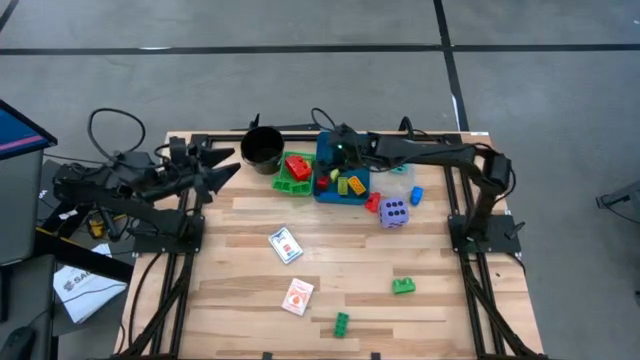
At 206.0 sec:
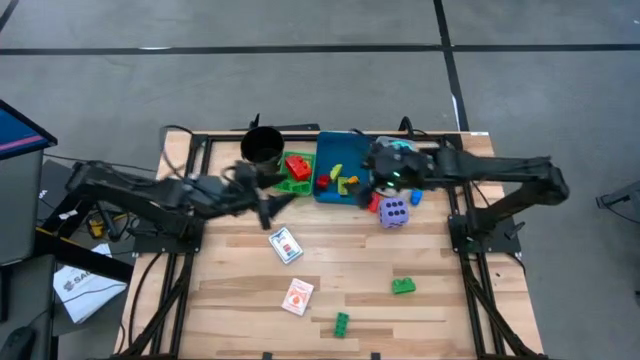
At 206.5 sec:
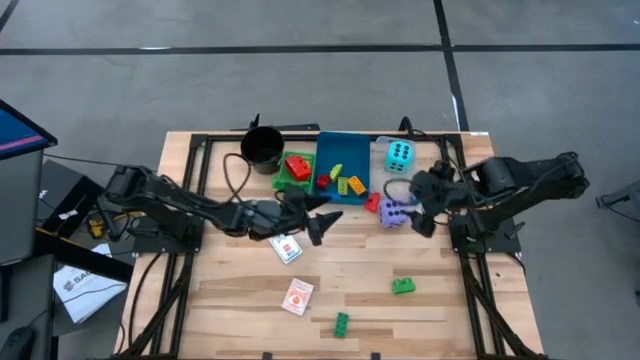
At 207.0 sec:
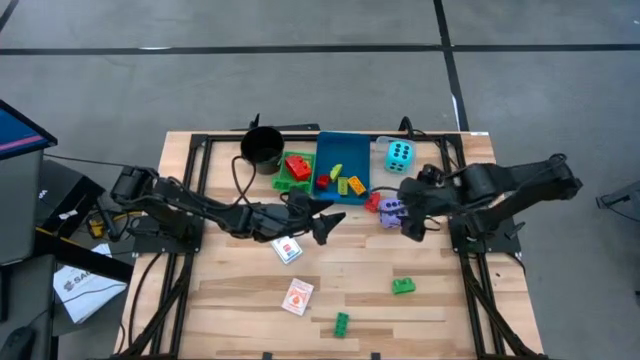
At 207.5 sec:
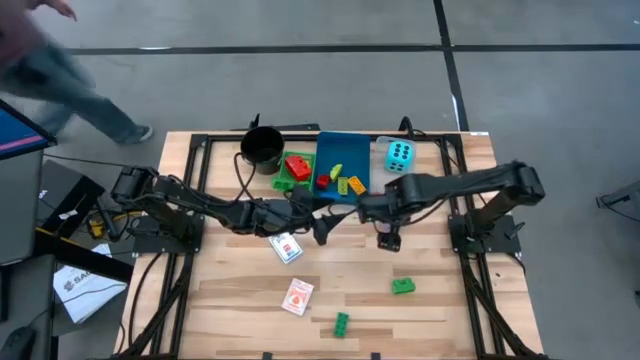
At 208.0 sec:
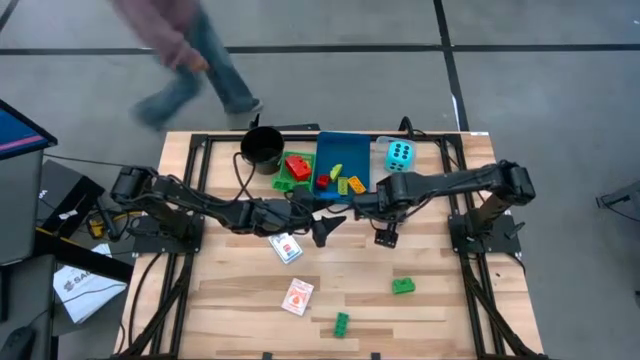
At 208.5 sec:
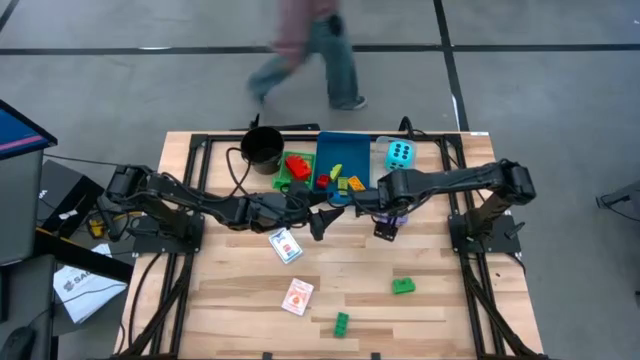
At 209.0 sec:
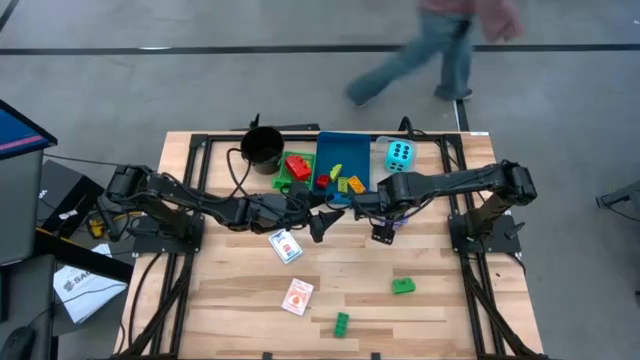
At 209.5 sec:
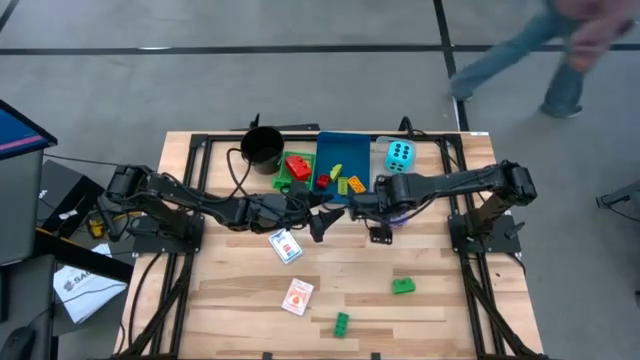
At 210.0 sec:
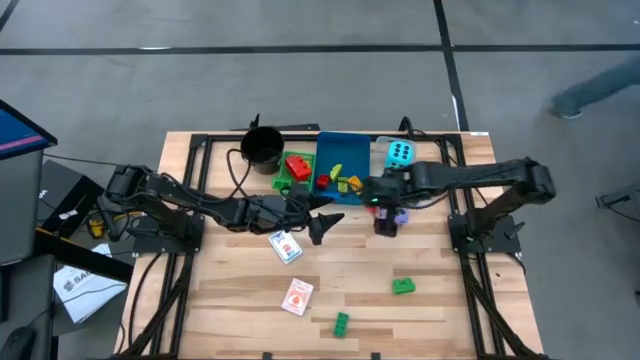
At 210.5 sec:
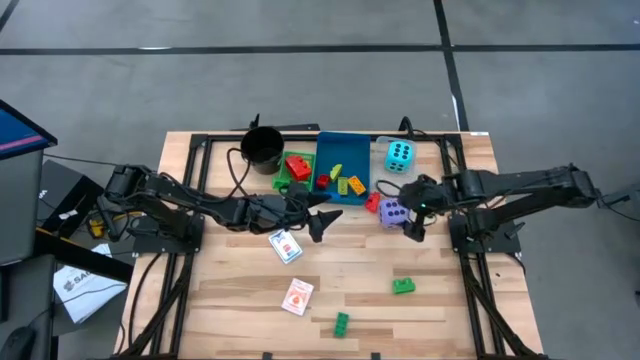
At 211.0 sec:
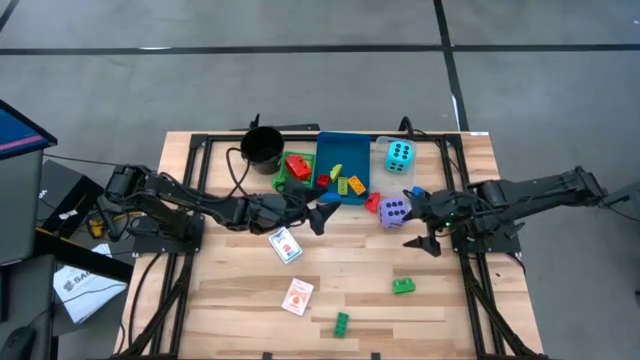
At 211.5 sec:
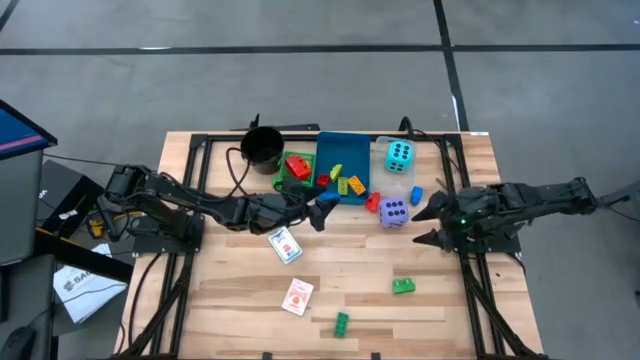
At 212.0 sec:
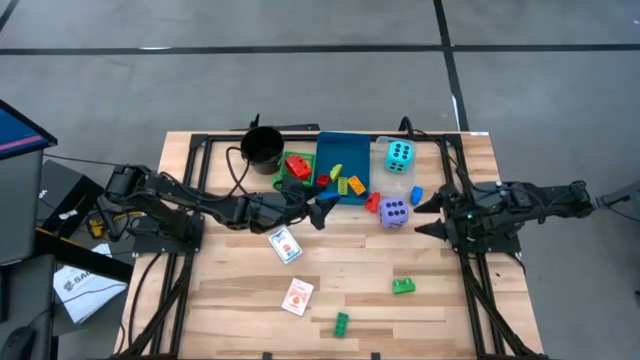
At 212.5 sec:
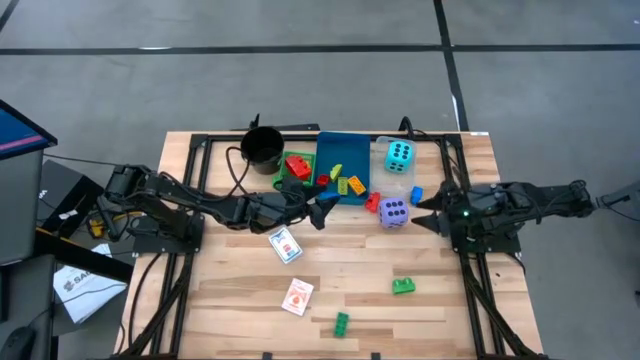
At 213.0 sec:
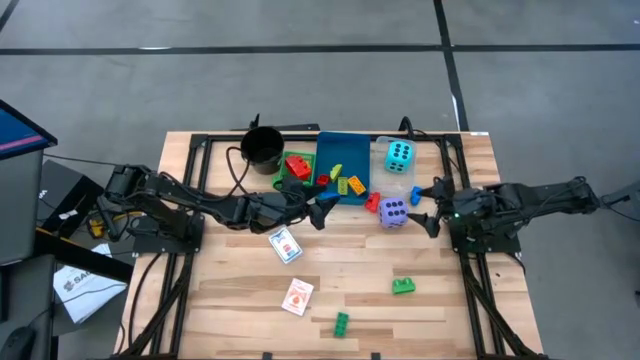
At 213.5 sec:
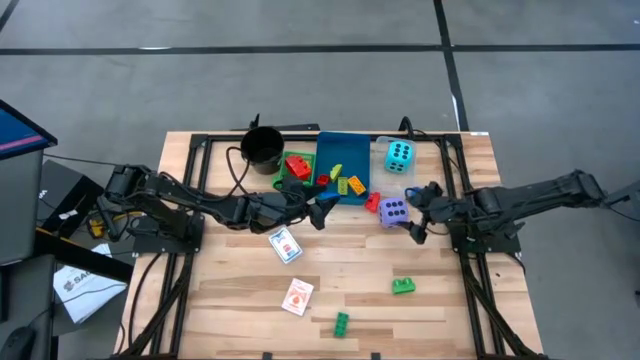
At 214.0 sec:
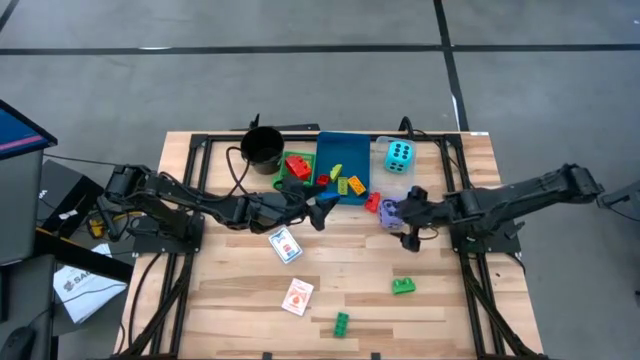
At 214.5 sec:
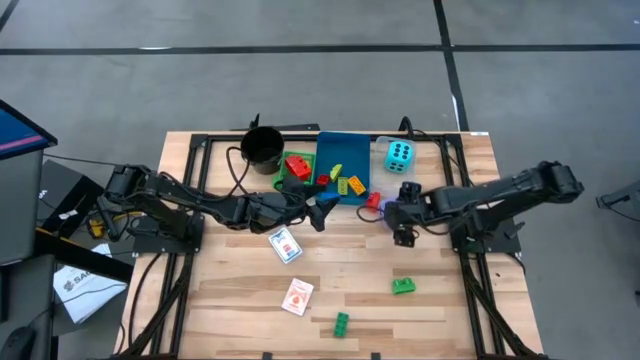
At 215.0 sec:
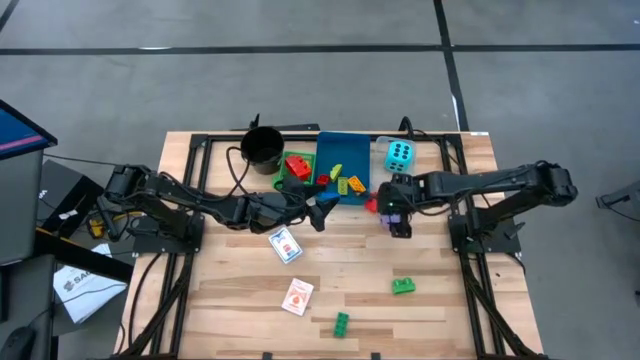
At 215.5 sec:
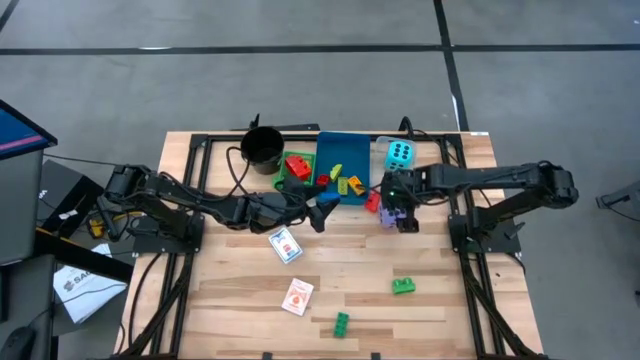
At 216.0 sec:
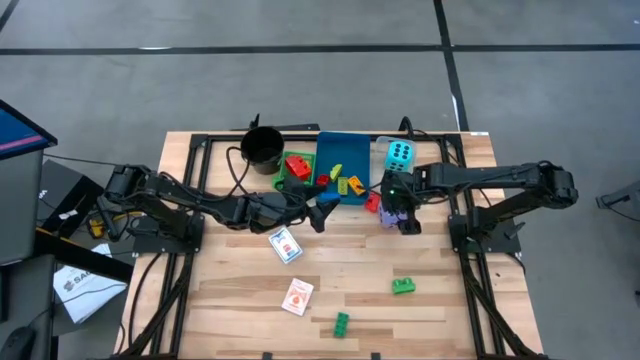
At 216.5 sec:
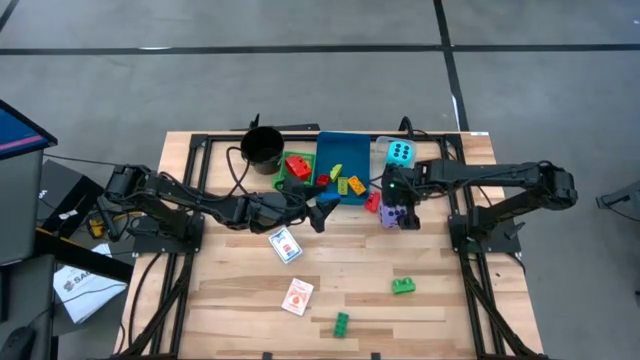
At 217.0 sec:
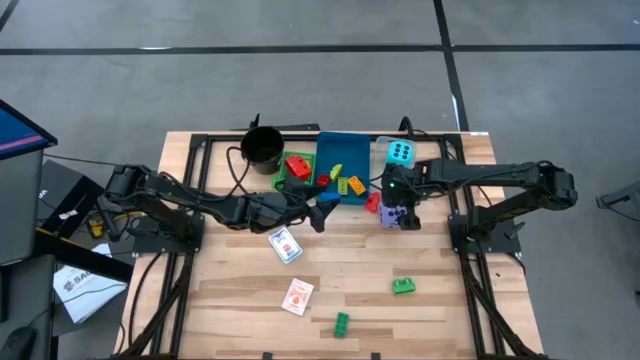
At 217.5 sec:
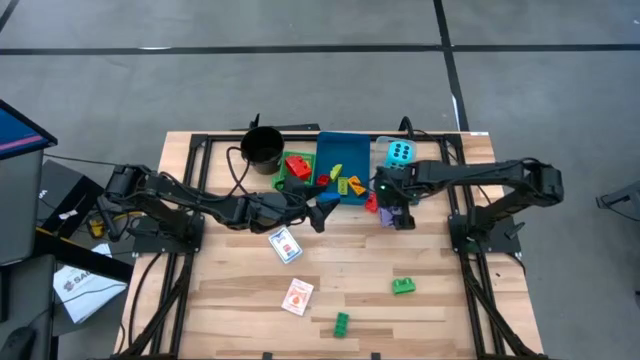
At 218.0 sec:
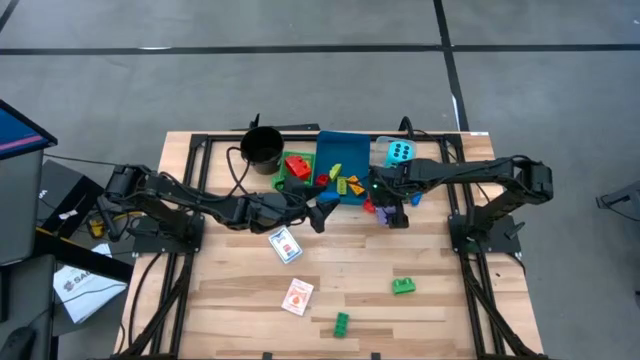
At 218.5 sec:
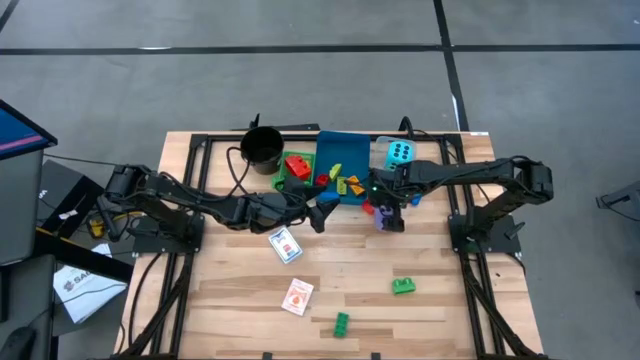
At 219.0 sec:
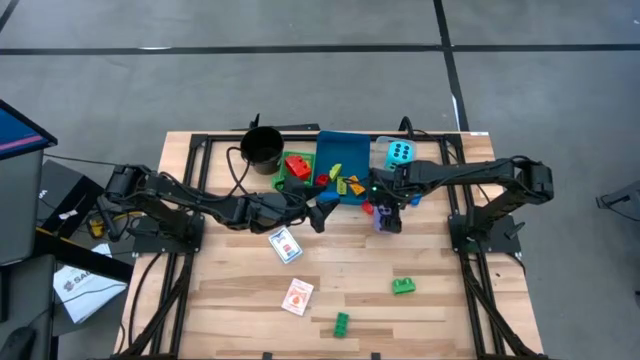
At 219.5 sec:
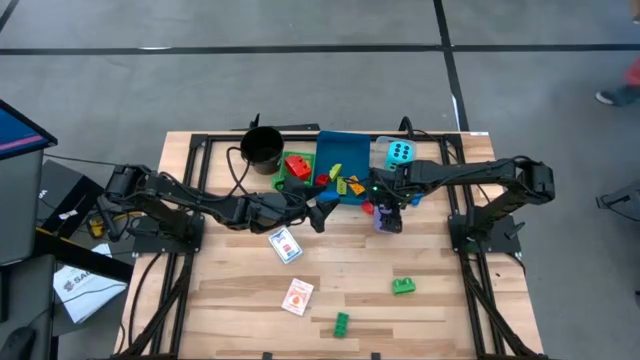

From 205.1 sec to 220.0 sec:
Task: Pick & Place Toys
Put the purple dice into the transparent bin
